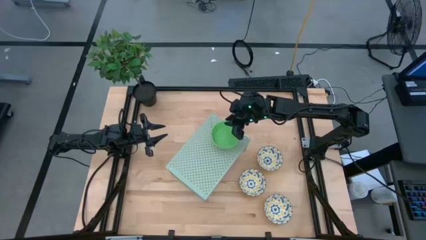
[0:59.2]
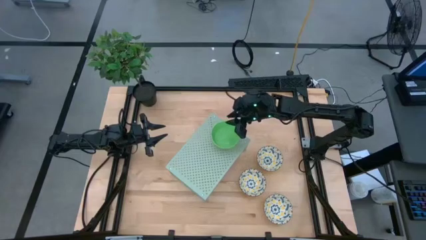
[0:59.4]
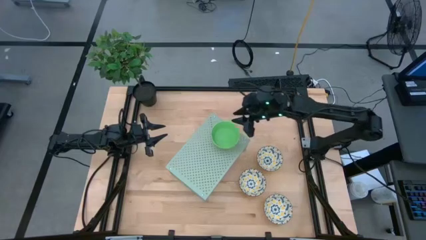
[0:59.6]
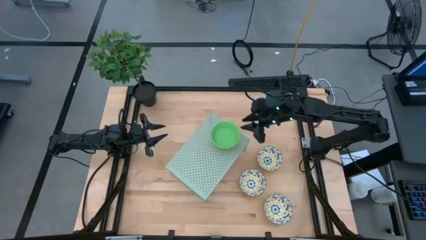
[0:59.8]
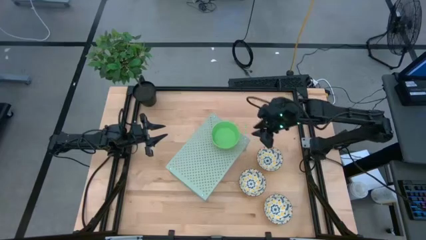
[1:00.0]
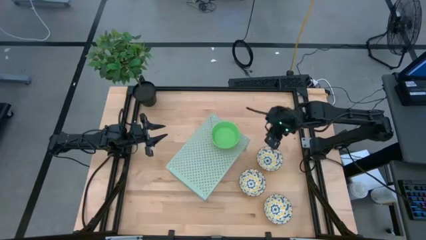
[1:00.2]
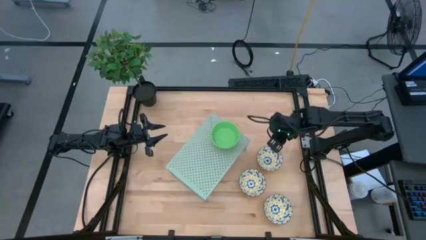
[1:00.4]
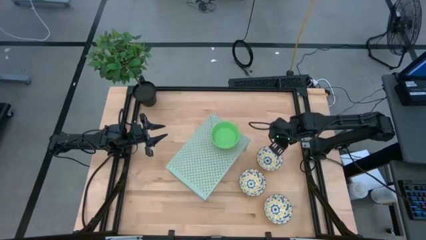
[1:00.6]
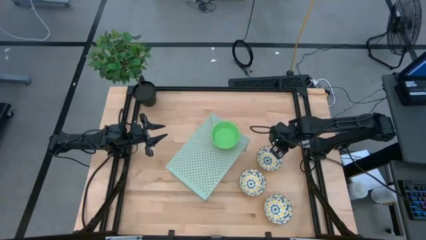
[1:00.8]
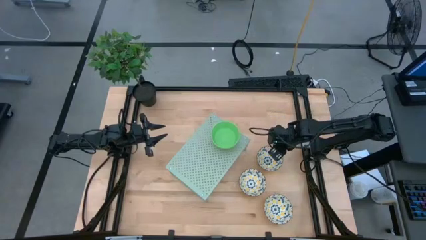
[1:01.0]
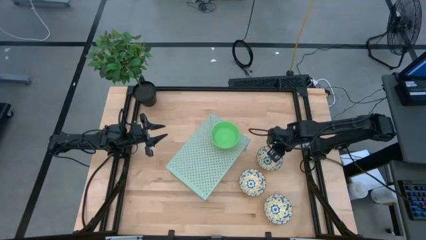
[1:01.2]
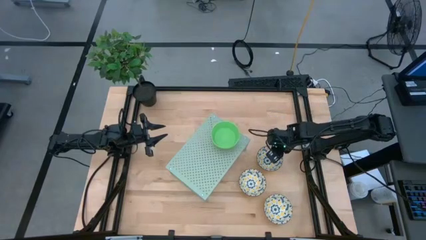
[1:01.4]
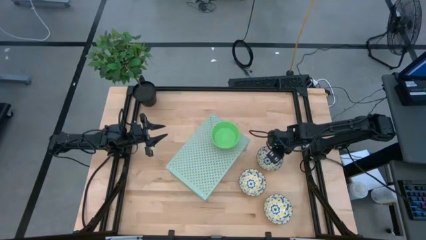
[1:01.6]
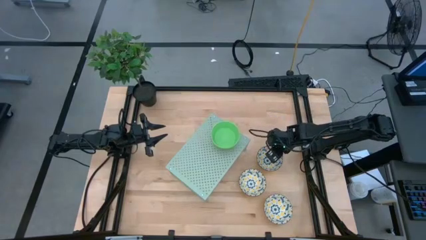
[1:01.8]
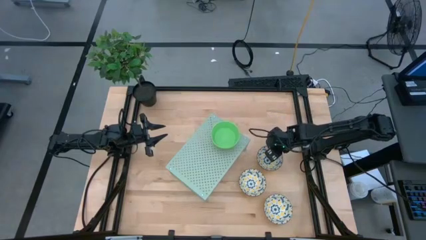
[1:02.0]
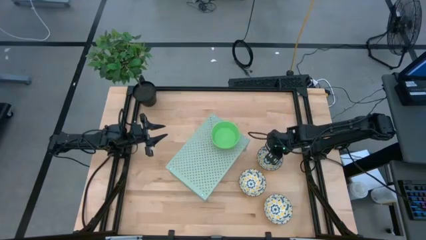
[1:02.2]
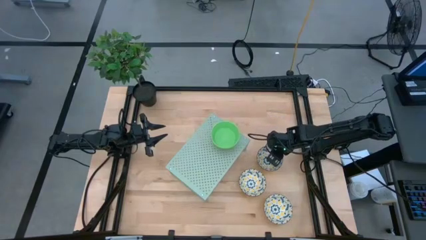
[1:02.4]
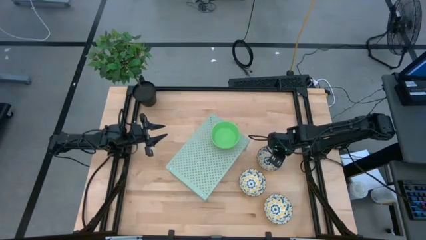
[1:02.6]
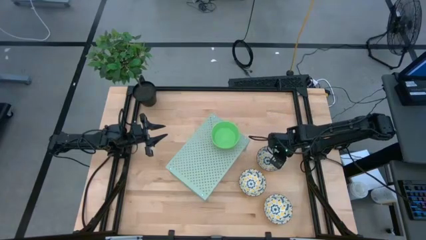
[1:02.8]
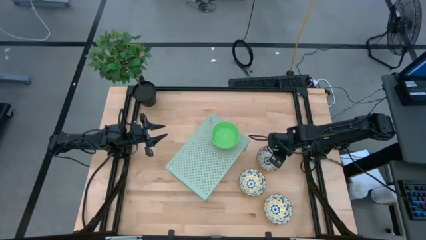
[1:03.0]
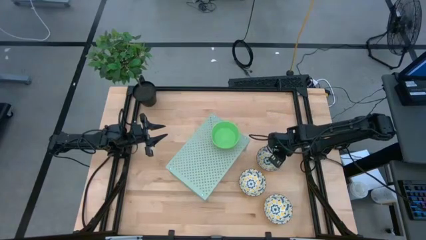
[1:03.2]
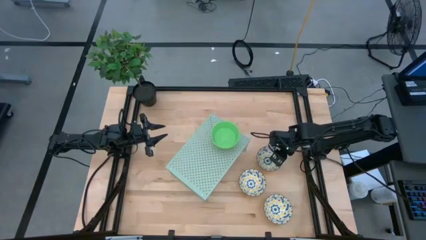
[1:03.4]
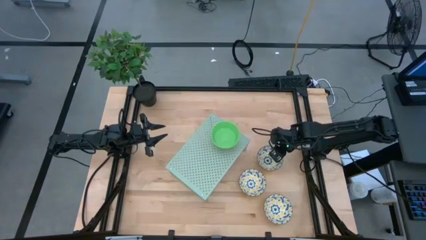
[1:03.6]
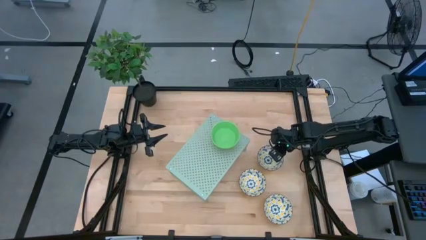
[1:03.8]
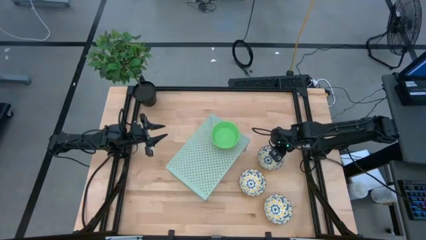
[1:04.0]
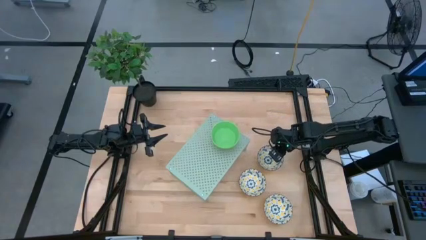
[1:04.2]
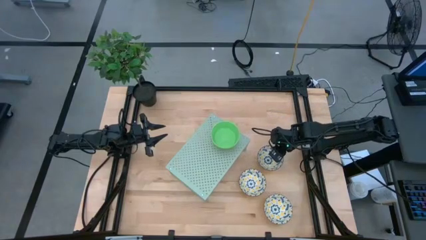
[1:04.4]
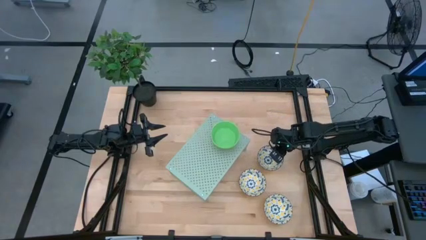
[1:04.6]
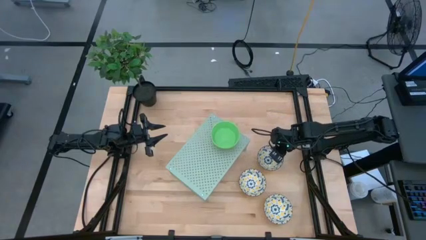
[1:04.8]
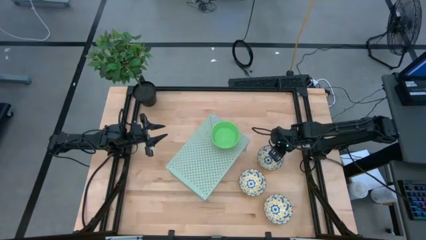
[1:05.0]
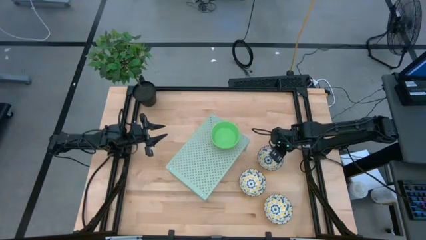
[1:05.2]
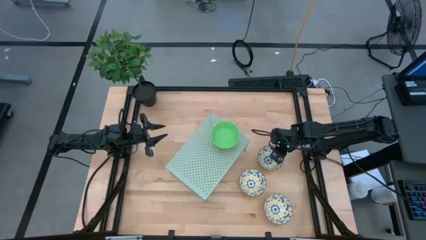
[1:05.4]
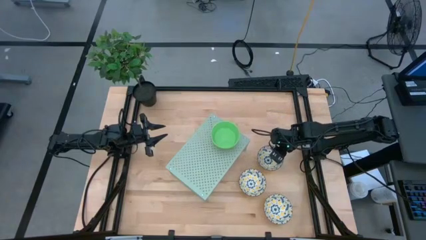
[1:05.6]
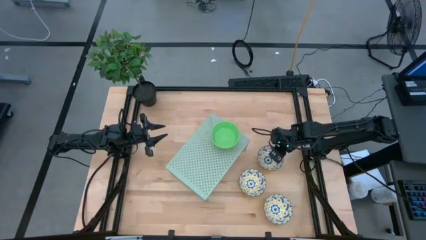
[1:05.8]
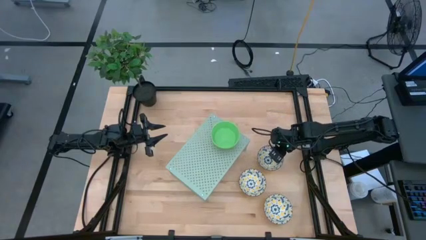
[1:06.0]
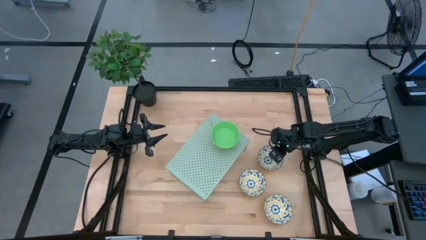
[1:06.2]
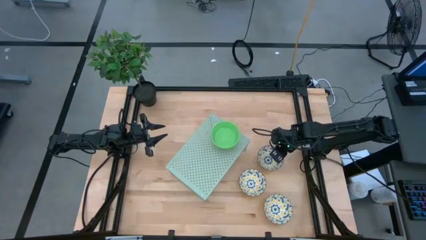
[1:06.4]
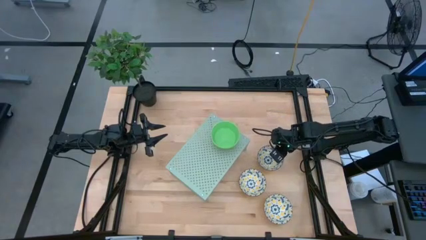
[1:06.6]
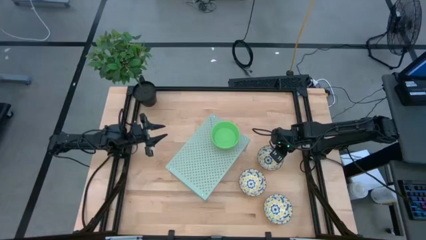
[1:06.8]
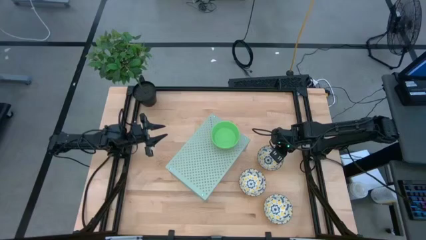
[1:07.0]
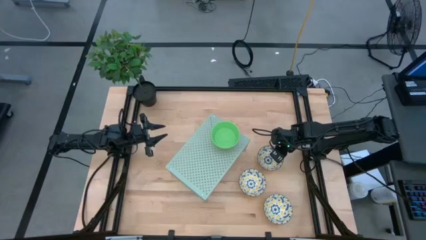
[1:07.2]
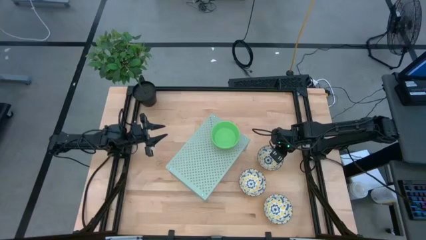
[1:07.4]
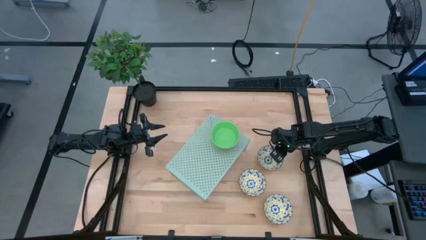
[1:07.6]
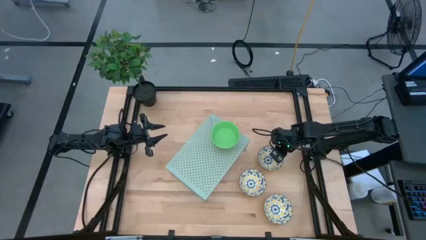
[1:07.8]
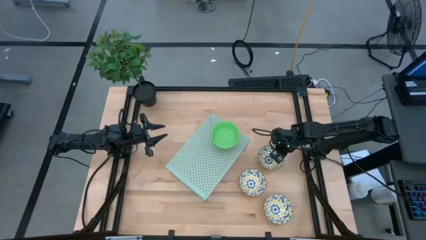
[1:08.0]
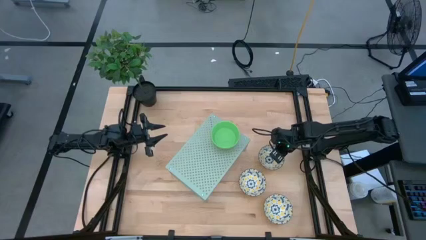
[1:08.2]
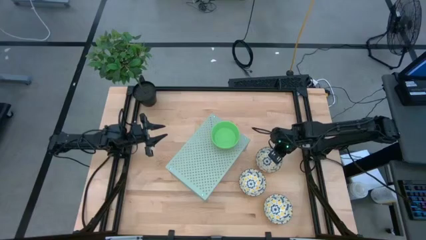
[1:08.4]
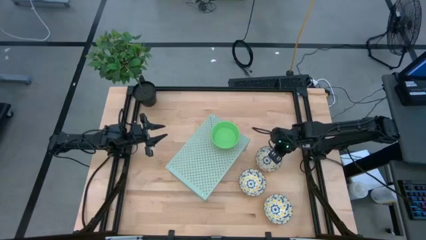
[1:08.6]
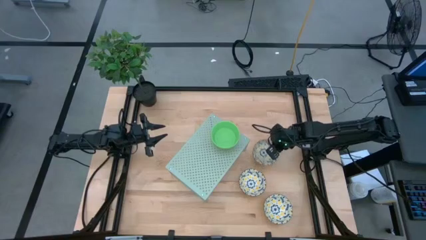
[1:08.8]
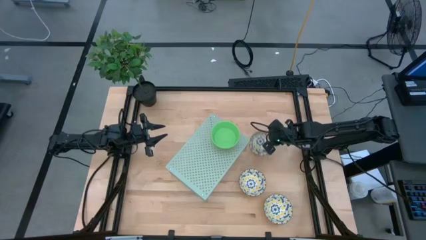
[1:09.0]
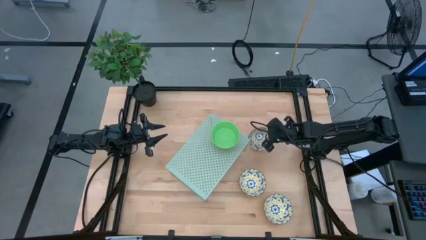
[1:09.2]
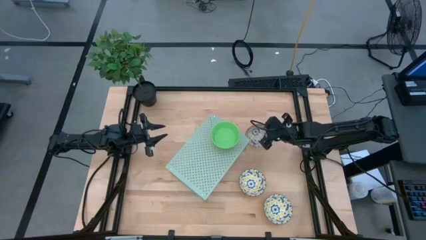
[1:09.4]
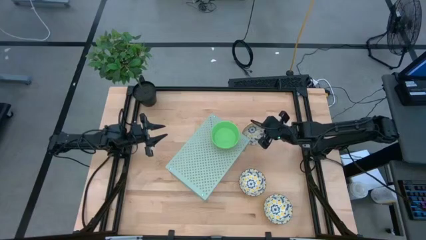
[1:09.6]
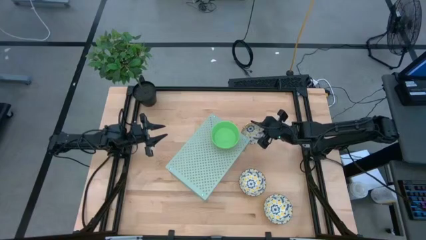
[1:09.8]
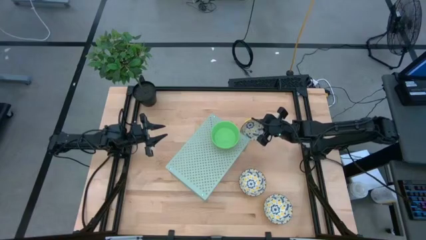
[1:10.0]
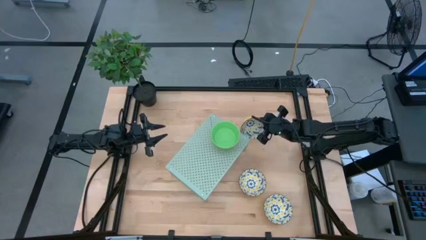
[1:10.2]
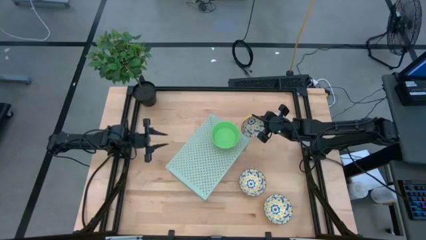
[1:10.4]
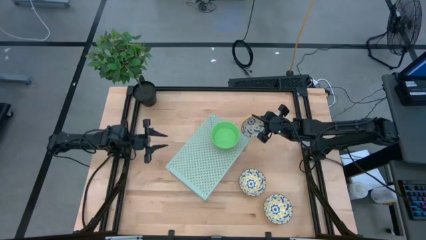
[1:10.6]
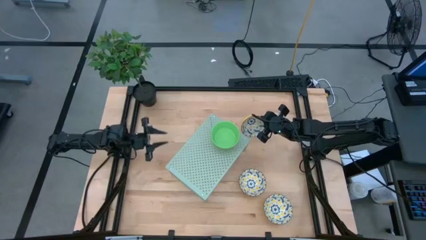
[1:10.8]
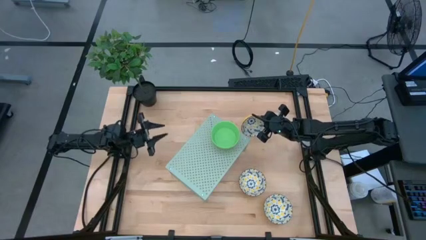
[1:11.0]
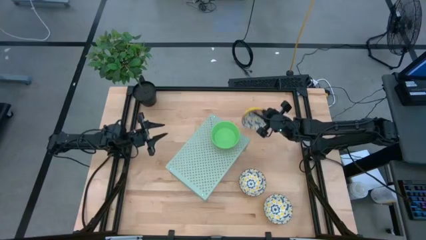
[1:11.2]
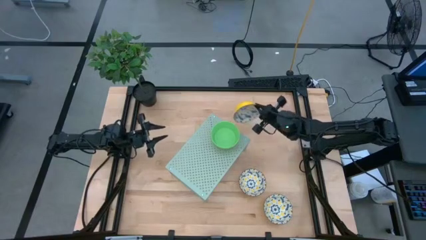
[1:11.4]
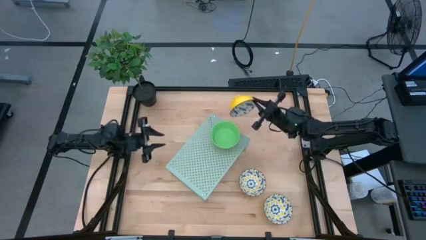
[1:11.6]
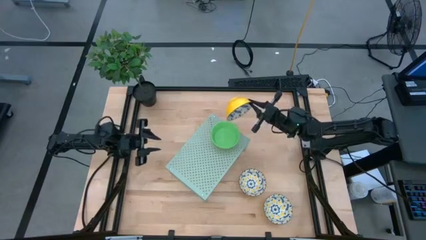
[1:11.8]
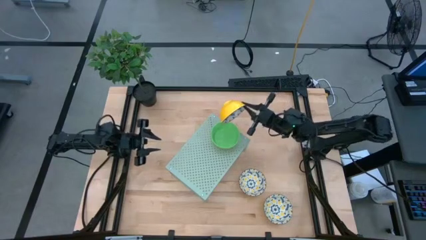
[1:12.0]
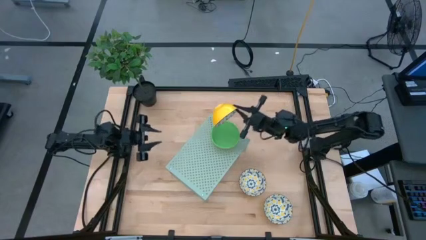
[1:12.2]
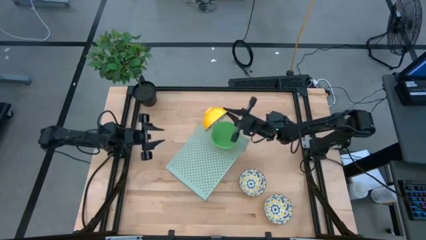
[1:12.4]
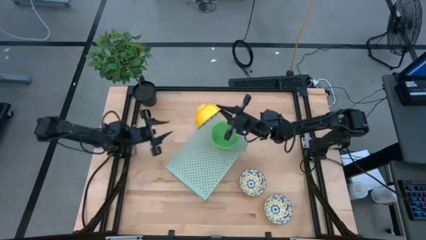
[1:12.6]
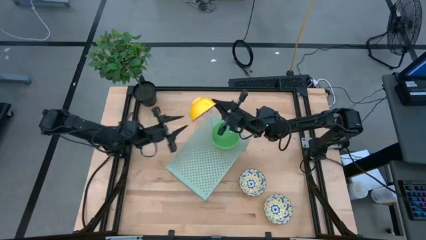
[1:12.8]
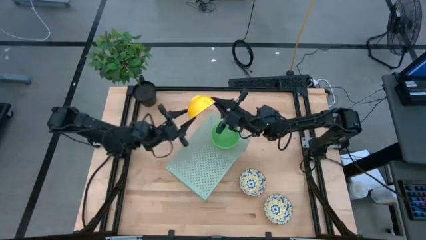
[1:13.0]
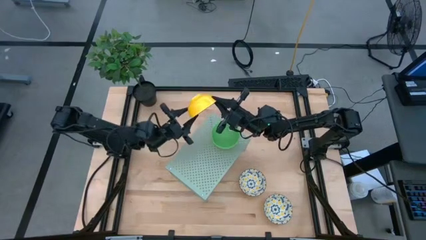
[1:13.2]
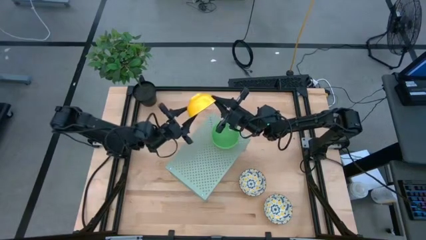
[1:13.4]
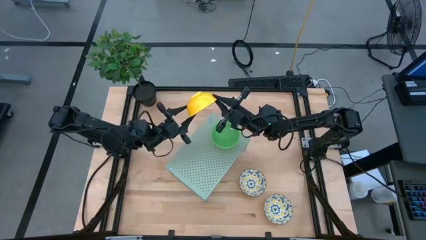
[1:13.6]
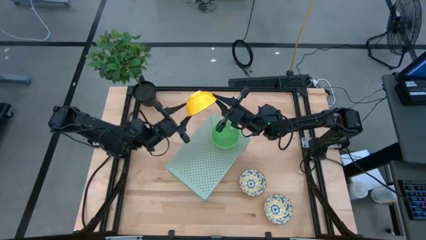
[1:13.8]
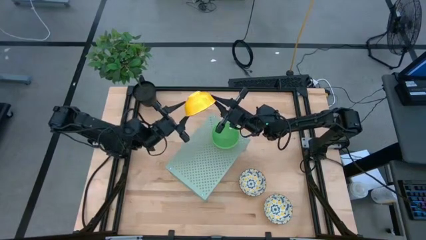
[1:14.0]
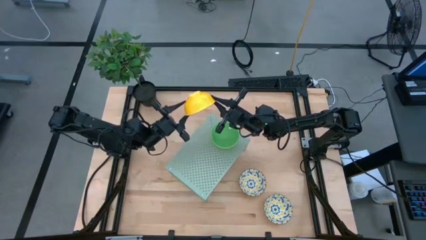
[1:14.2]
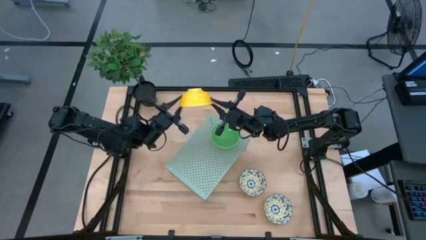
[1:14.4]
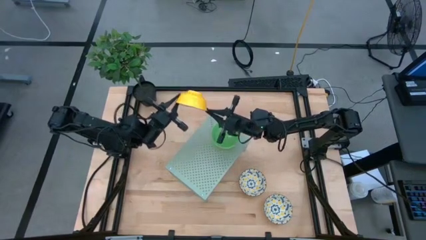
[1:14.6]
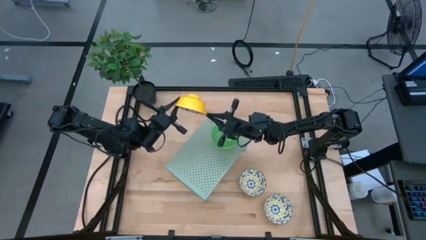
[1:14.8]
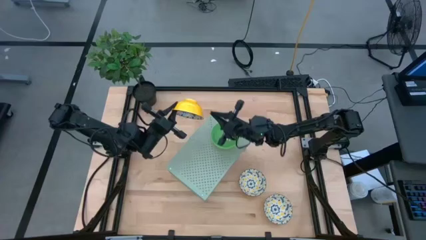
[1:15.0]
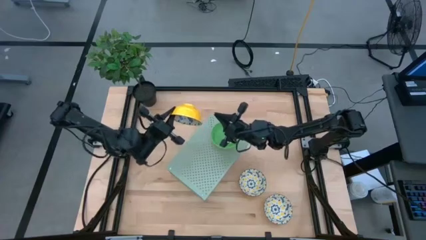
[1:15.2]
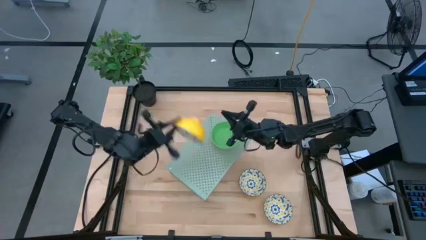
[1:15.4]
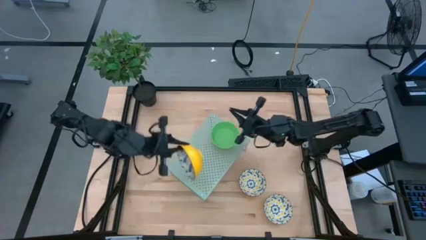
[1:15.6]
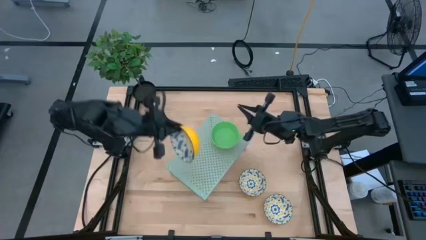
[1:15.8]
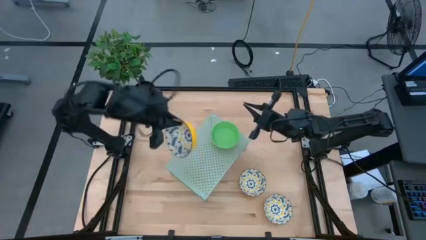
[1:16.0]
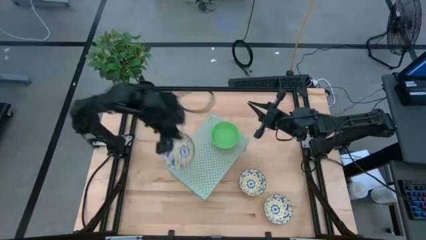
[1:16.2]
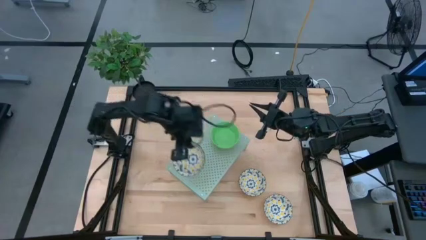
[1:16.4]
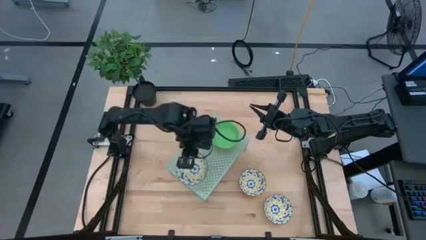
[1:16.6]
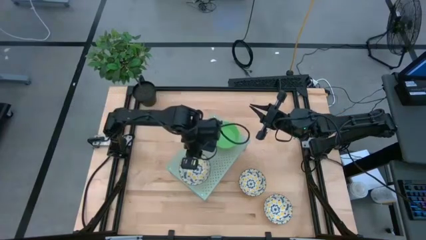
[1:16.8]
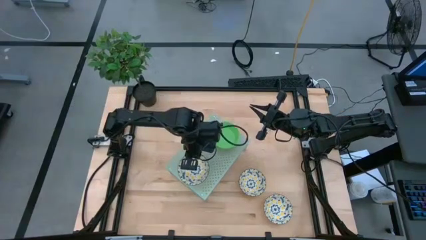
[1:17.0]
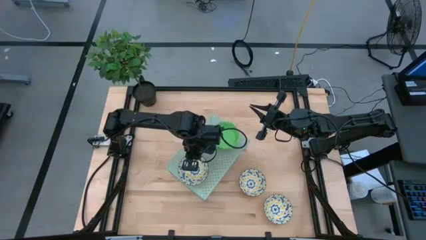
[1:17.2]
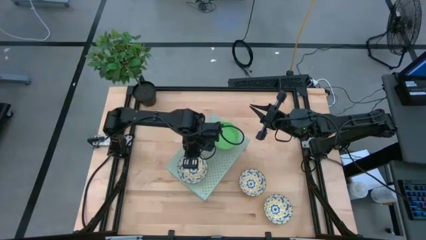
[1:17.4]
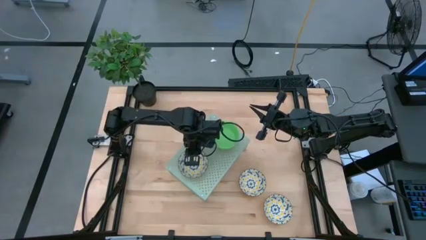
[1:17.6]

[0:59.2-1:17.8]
Task: Pick & Place Mini bowls
Put the top patterned bowl on the left of the shelf
